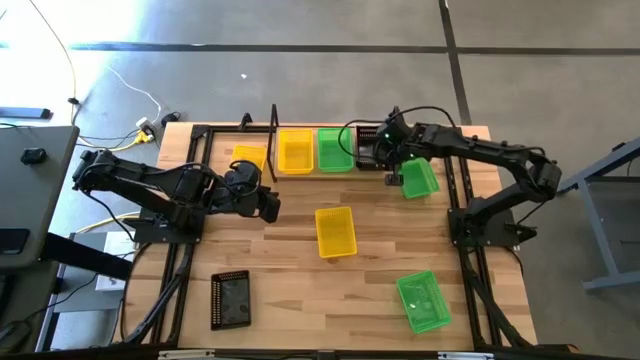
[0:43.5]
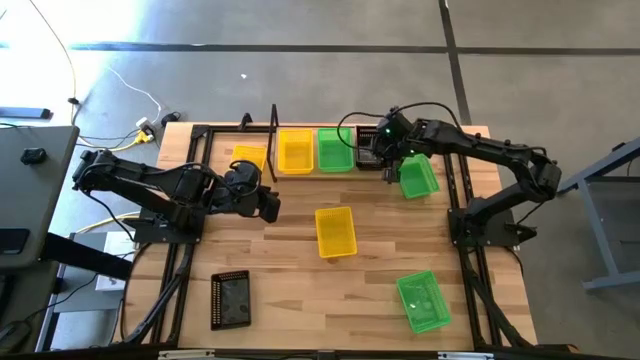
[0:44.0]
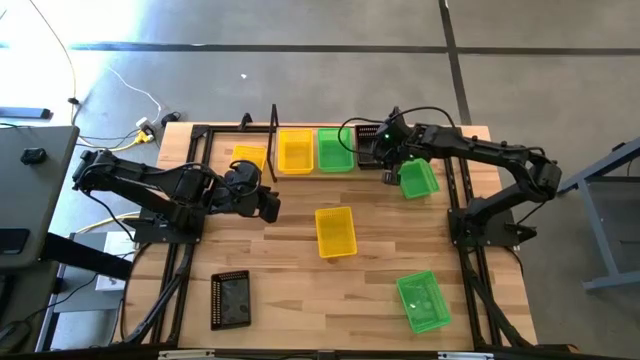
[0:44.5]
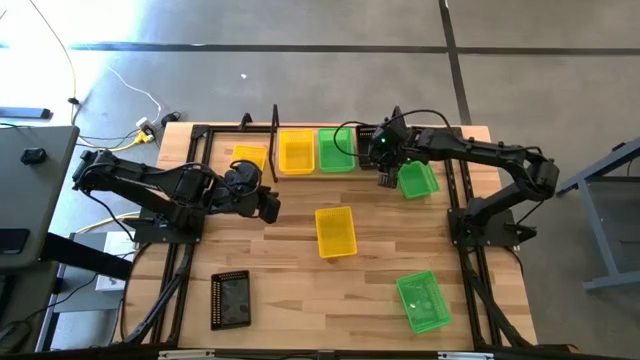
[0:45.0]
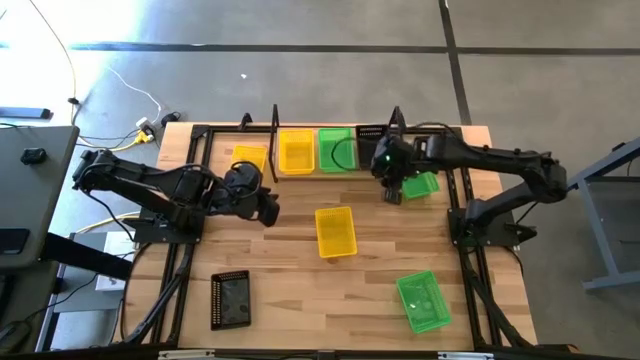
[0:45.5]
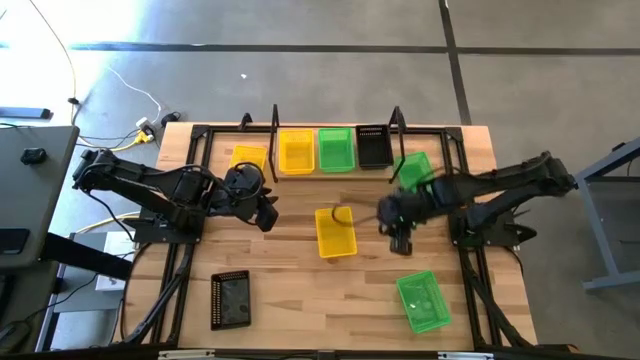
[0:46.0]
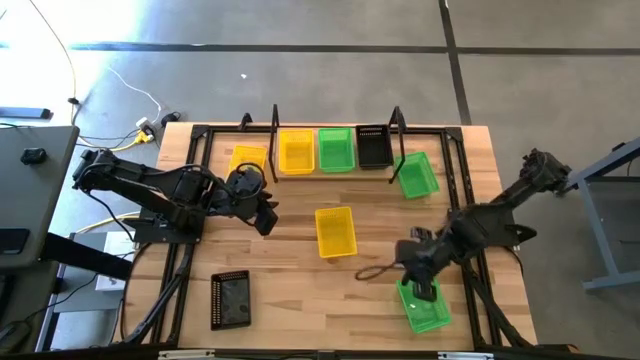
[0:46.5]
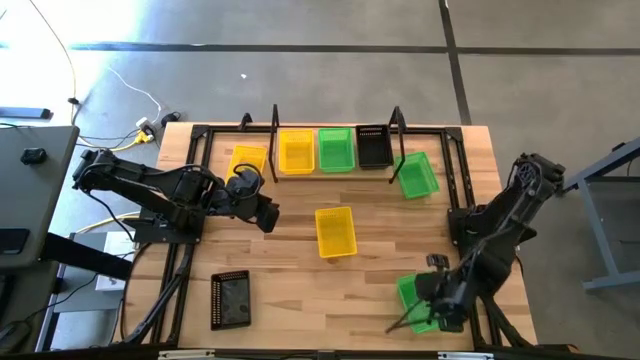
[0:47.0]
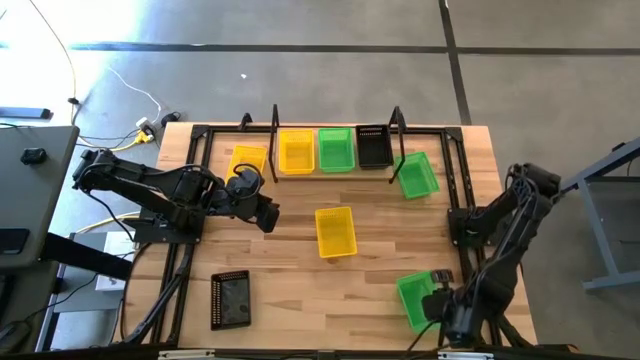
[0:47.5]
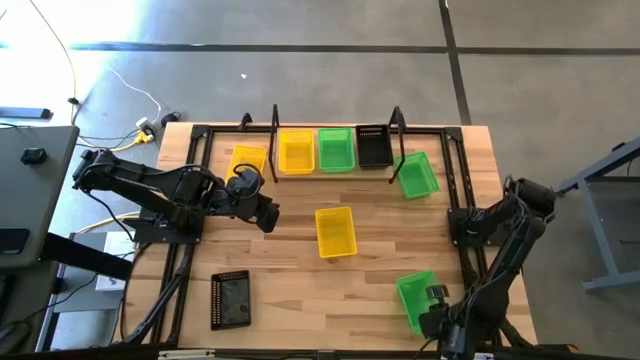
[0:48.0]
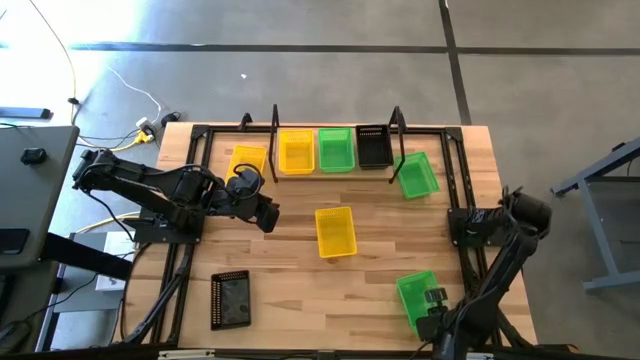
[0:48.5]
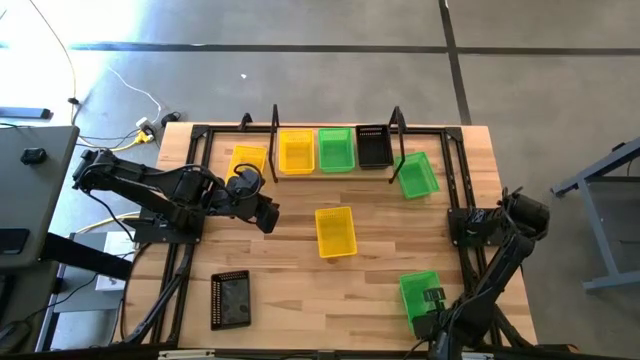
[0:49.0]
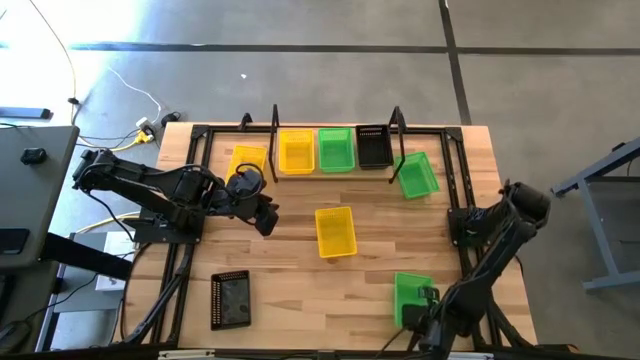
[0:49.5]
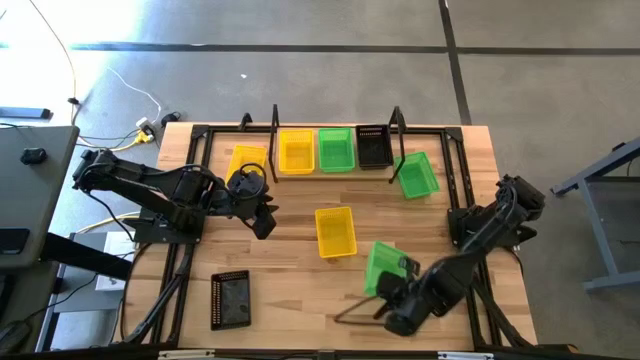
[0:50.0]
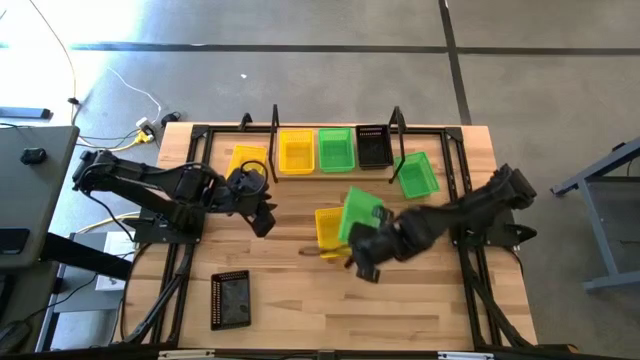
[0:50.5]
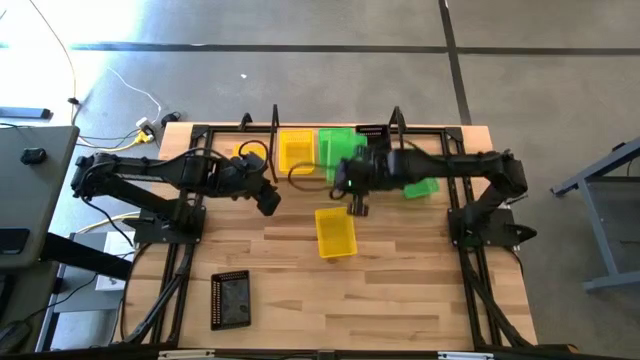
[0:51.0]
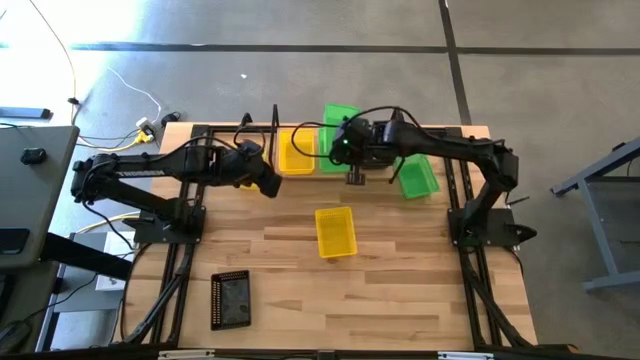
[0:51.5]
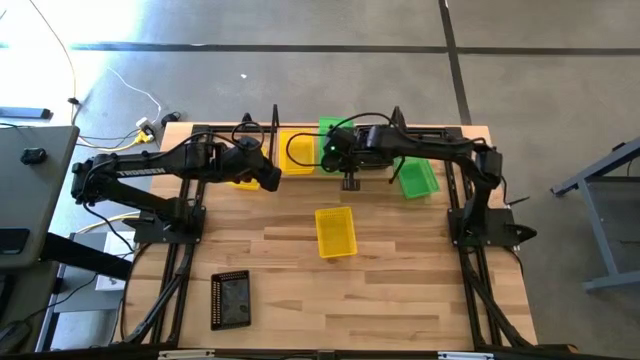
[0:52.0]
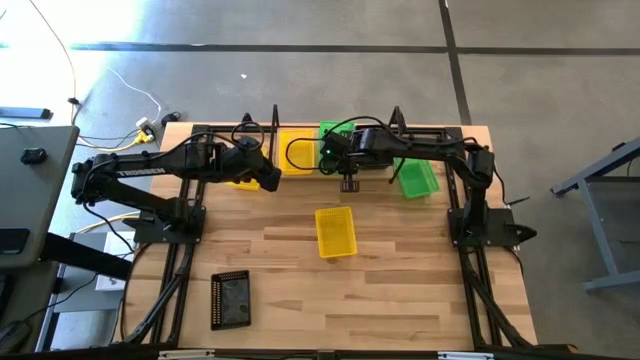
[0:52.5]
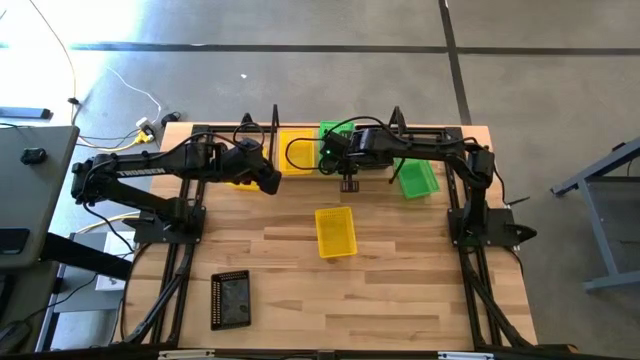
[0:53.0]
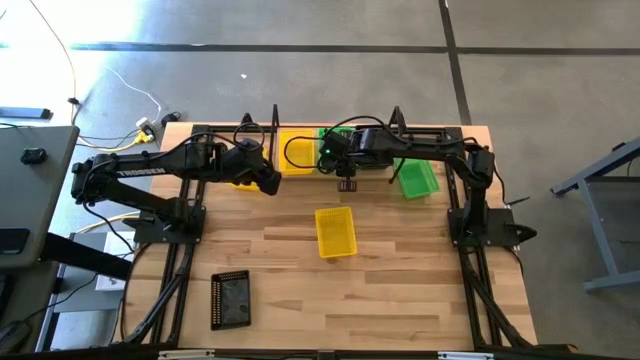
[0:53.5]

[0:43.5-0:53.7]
Task: Stack baskets on shelf by color
Stack the bottom green bin on top of the green bin on the shelf

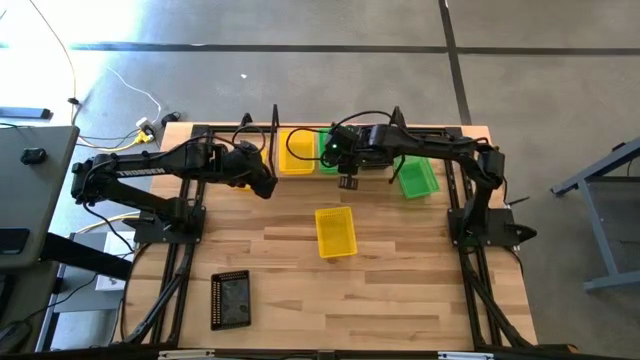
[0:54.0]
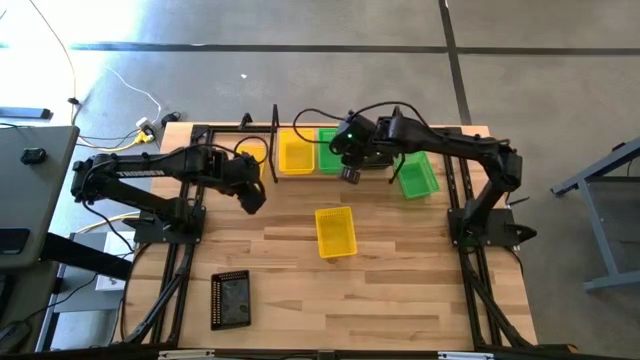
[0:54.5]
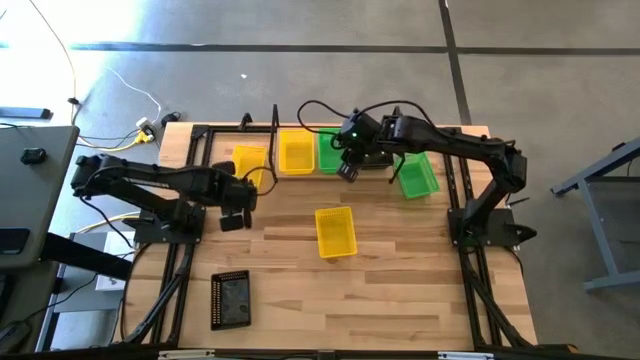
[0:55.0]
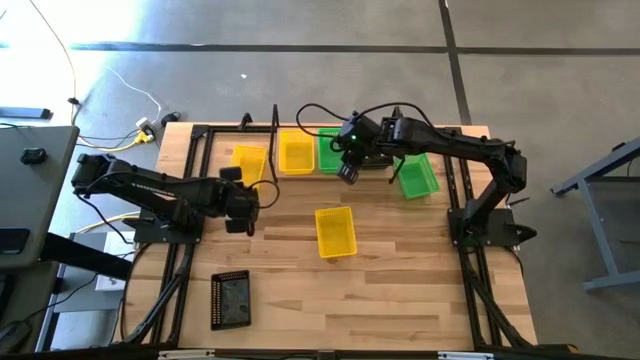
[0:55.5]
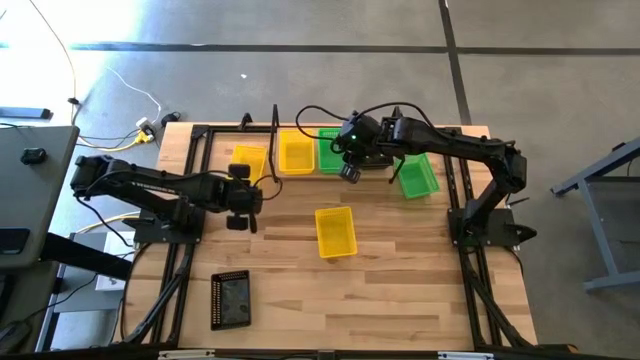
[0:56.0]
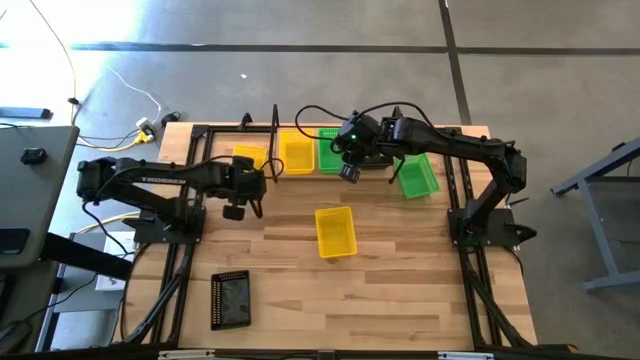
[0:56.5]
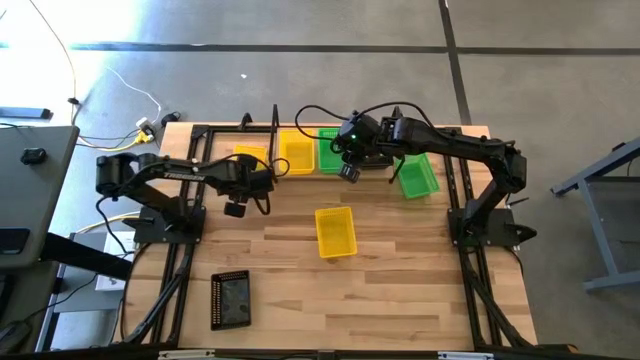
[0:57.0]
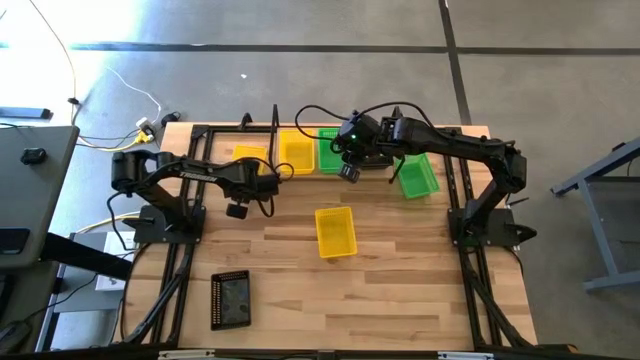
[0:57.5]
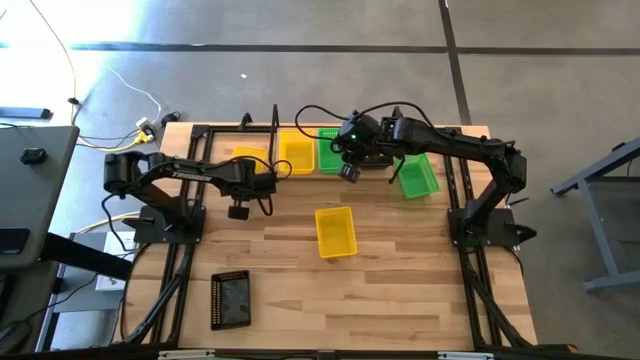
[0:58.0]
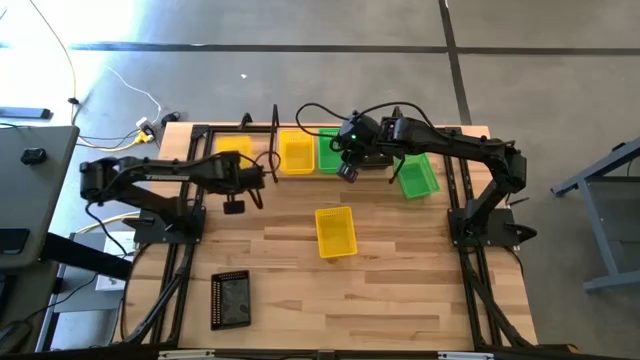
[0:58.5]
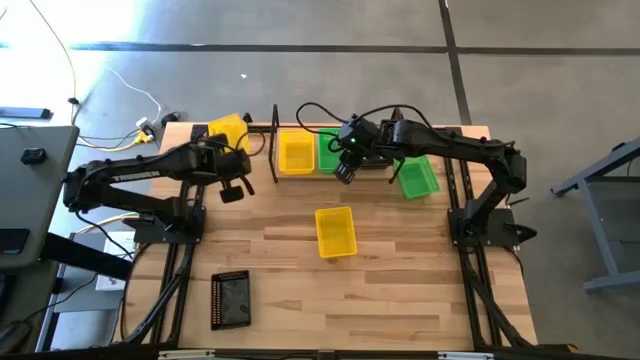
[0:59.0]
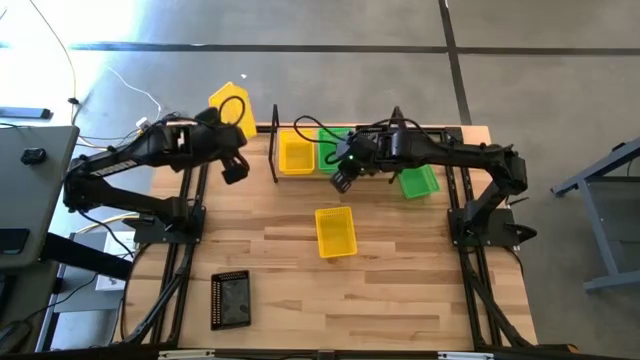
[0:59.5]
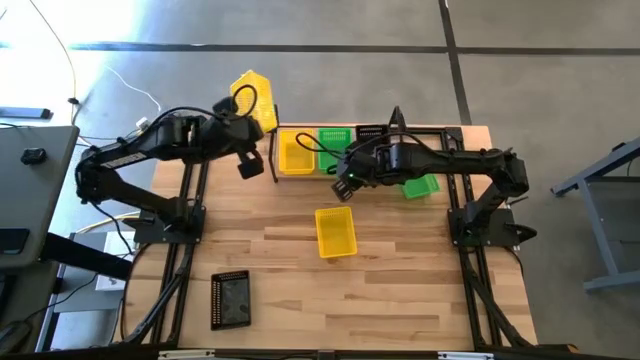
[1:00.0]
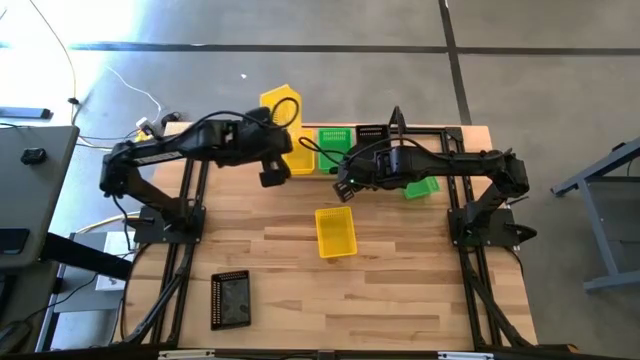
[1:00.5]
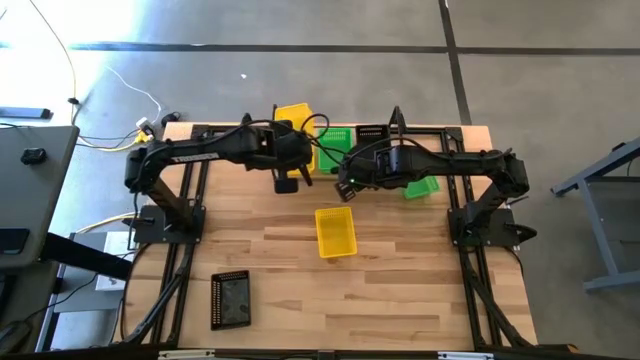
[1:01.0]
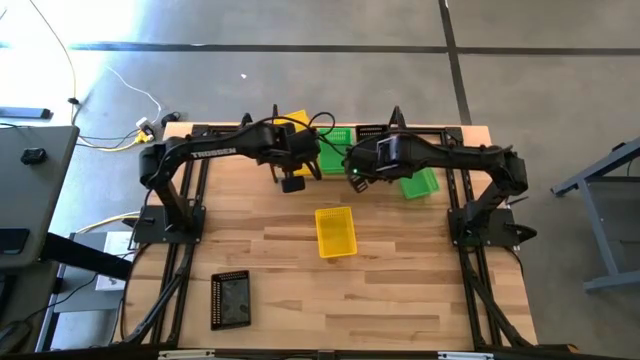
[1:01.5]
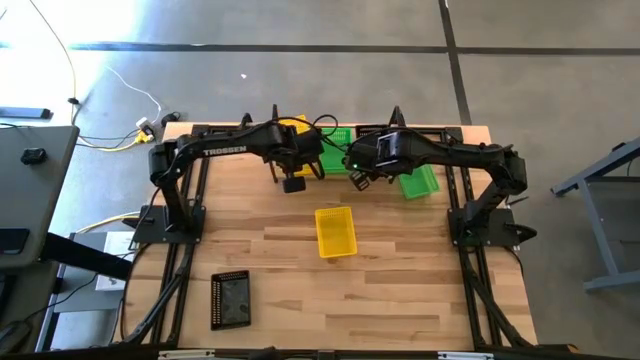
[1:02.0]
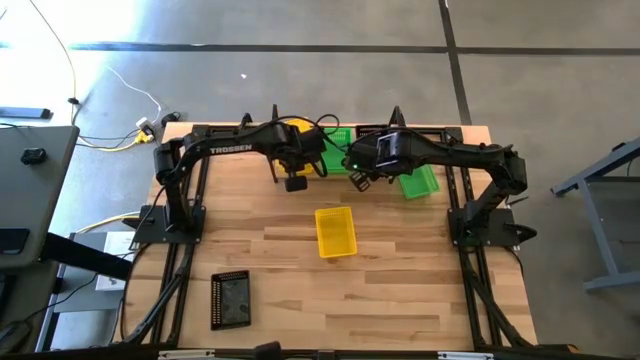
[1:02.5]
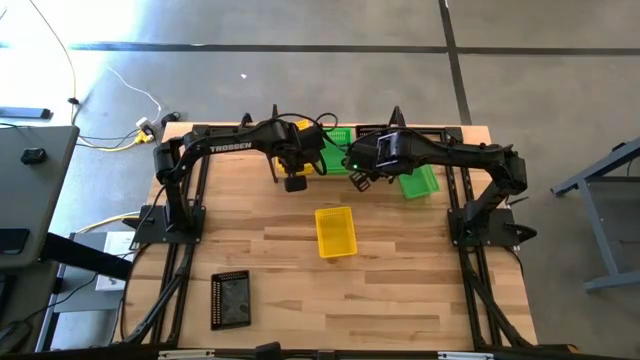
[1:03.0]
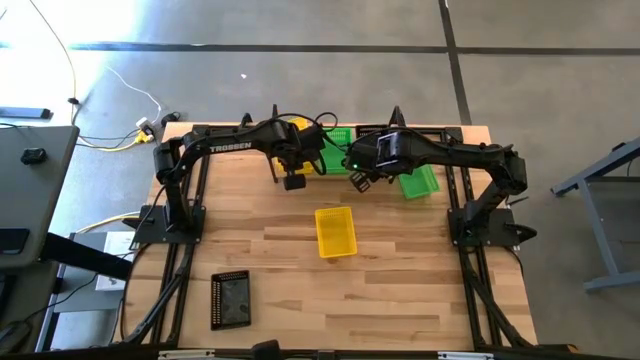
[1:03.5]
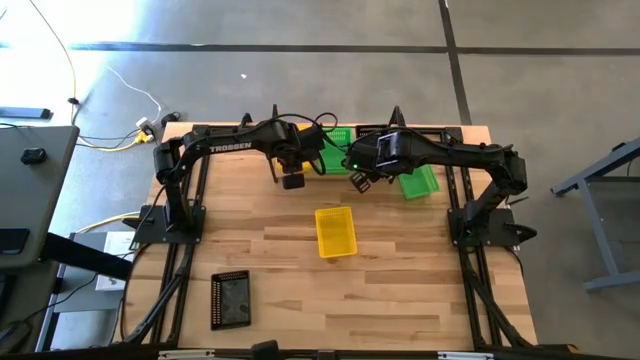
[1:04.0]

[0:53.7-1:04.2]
Stack the top left yellow bin on top of the yellow bin on the shelf

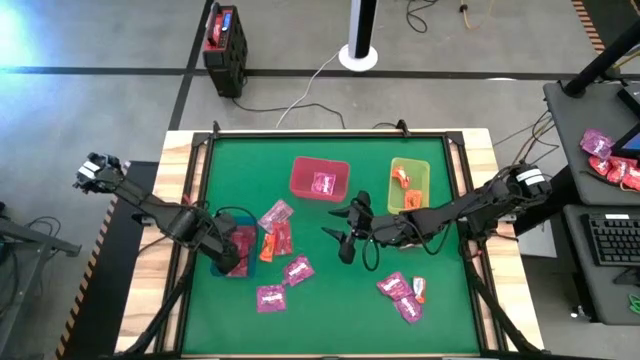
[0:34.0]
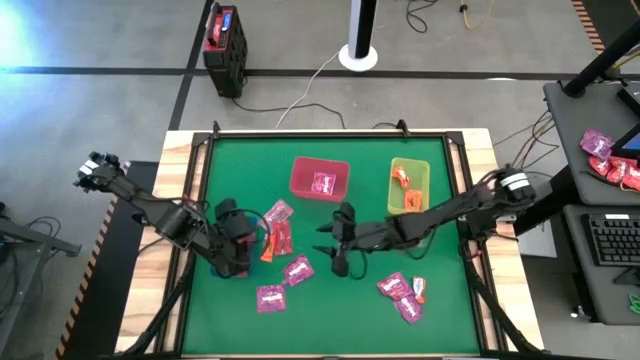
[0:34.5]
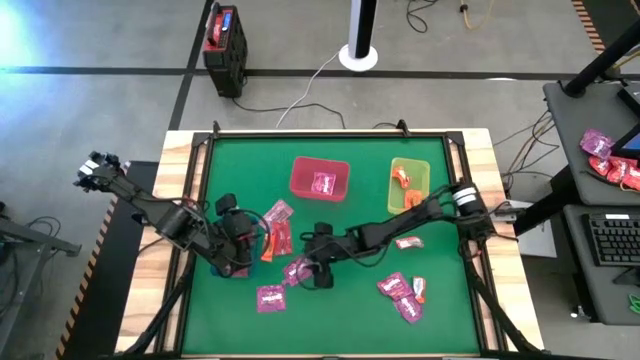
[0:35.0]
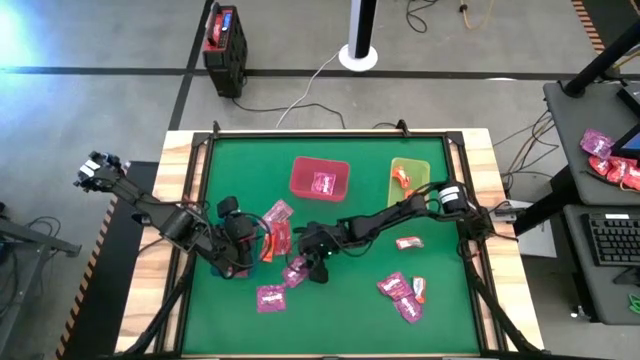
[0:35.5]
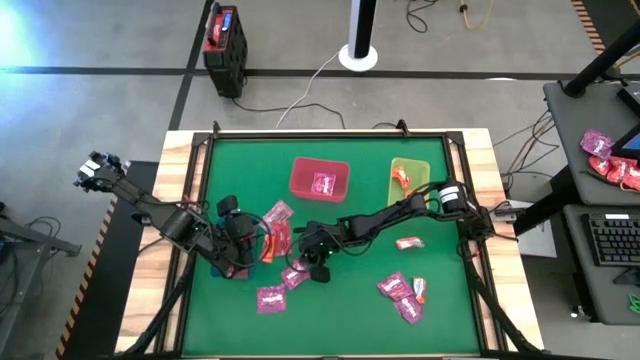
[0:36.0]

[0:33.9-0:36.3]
Task: Sort candy by brand, put in halloween buckets
Put the violet candy into the red bin
